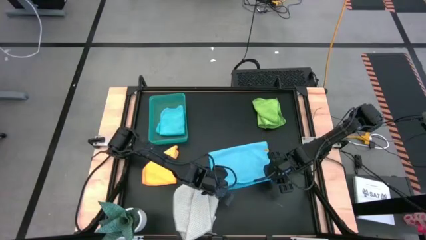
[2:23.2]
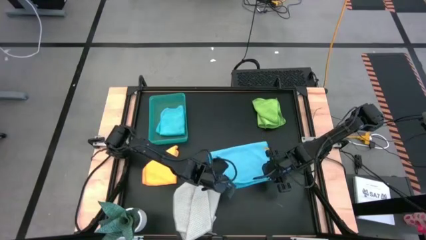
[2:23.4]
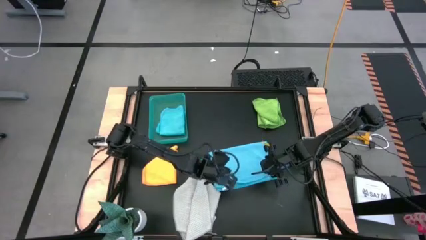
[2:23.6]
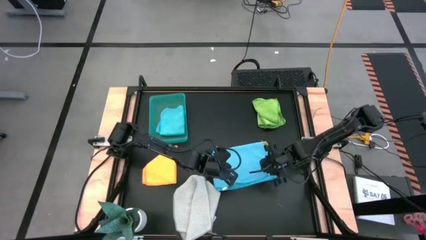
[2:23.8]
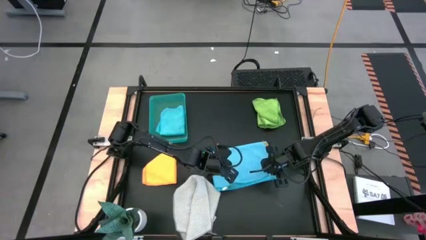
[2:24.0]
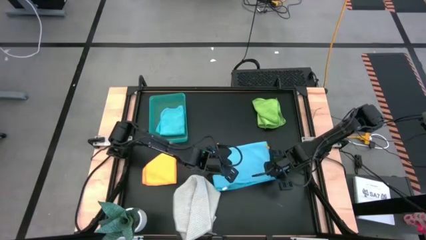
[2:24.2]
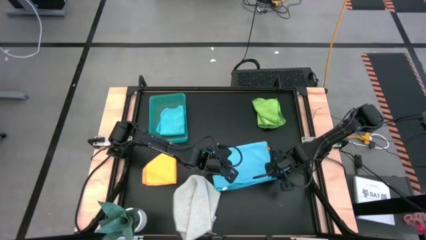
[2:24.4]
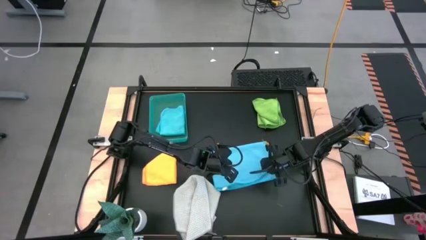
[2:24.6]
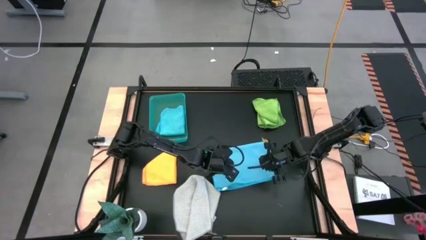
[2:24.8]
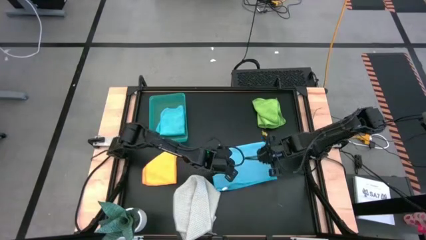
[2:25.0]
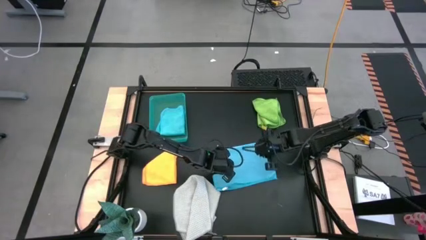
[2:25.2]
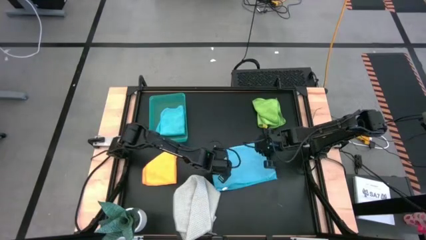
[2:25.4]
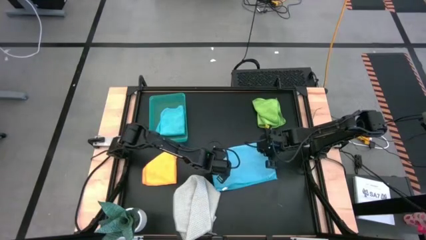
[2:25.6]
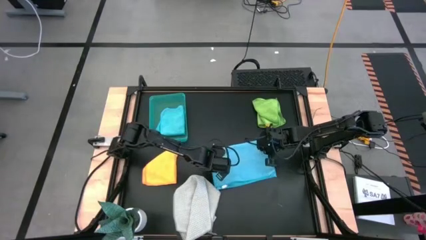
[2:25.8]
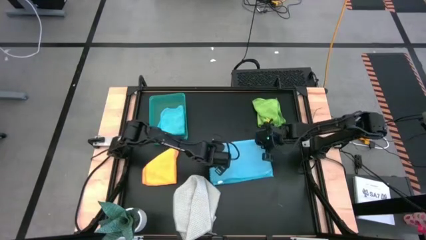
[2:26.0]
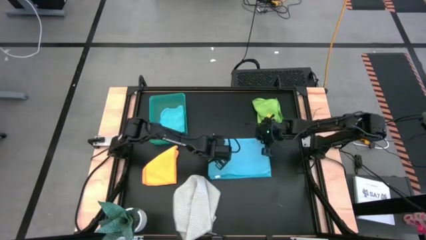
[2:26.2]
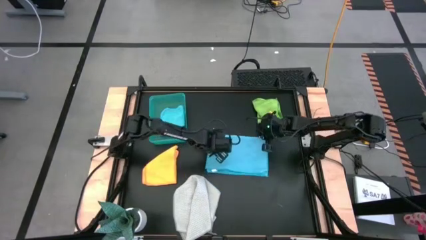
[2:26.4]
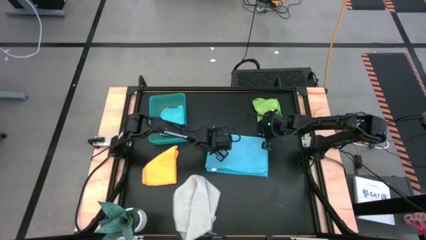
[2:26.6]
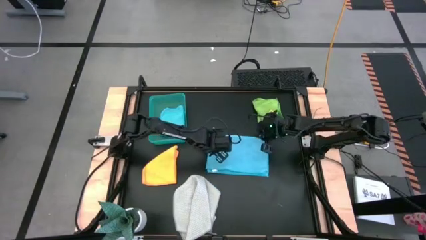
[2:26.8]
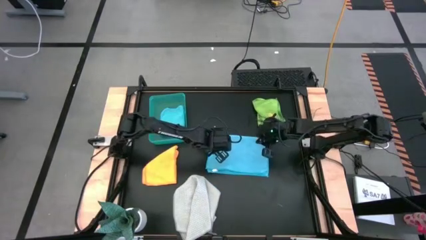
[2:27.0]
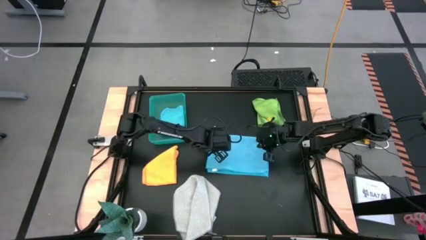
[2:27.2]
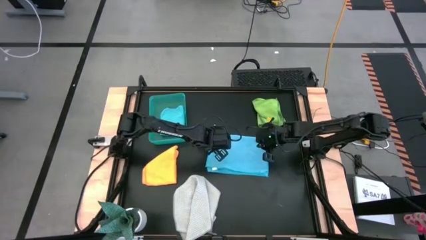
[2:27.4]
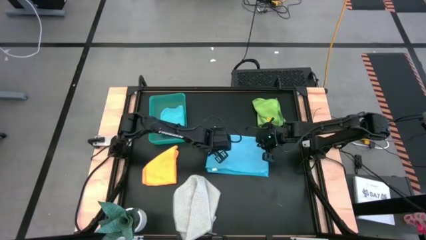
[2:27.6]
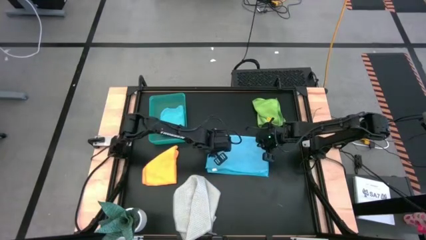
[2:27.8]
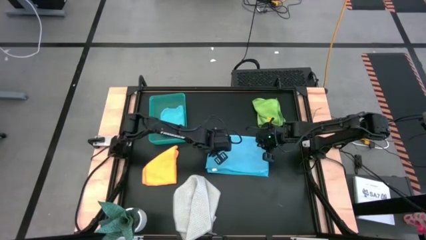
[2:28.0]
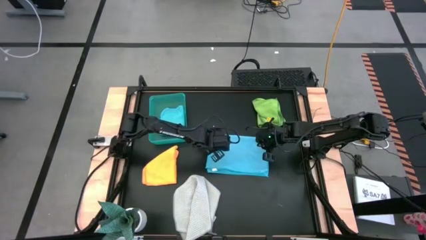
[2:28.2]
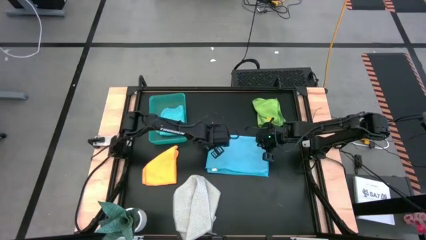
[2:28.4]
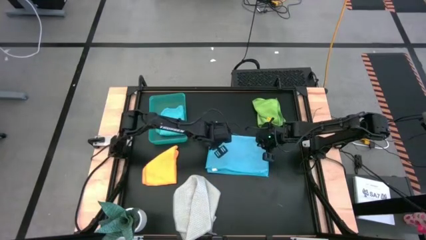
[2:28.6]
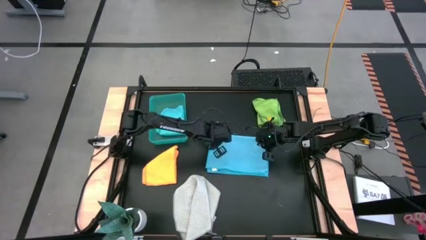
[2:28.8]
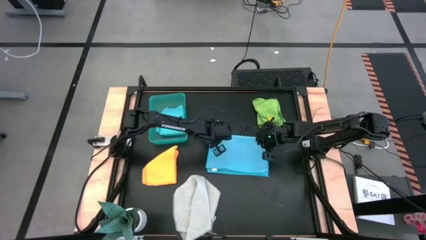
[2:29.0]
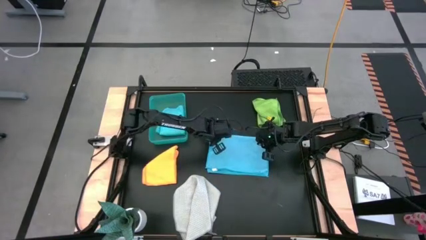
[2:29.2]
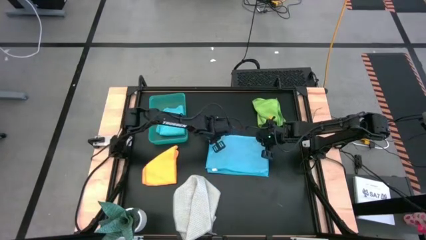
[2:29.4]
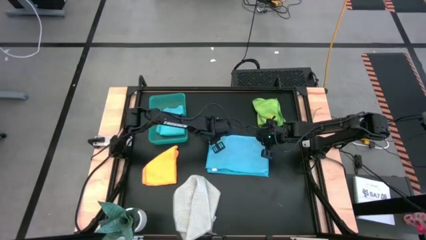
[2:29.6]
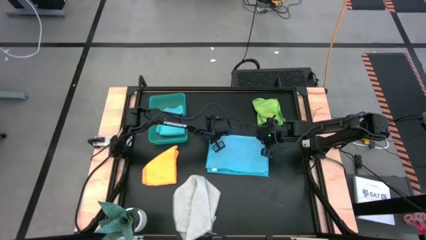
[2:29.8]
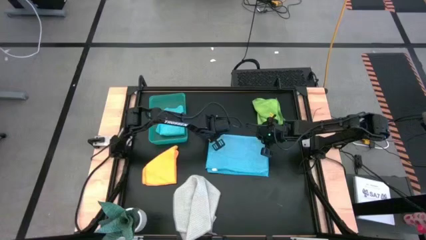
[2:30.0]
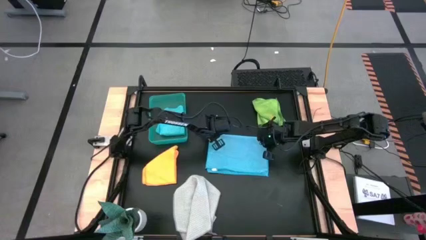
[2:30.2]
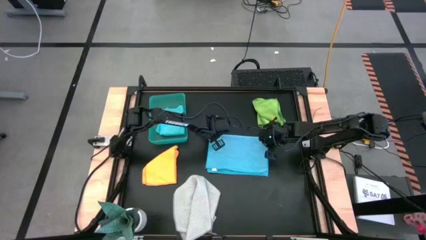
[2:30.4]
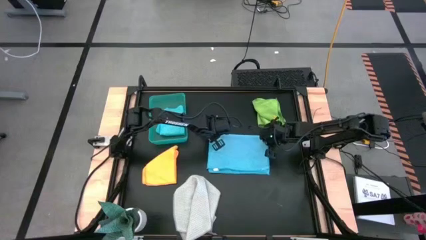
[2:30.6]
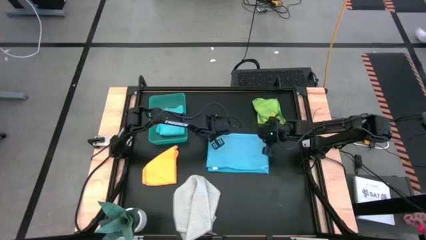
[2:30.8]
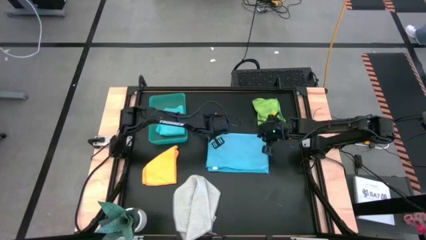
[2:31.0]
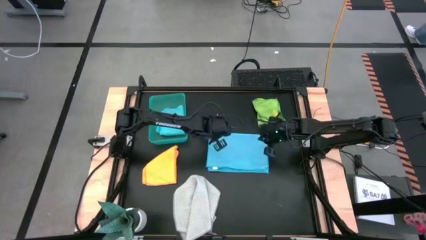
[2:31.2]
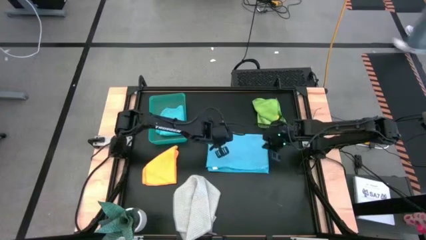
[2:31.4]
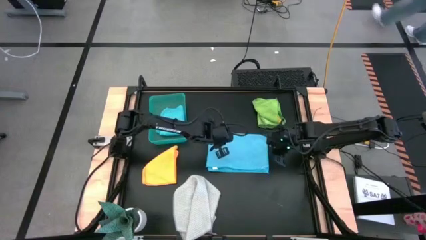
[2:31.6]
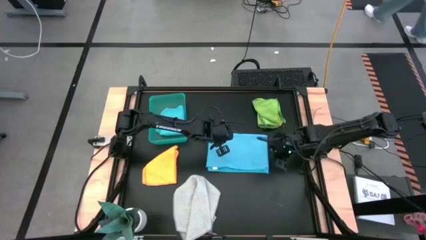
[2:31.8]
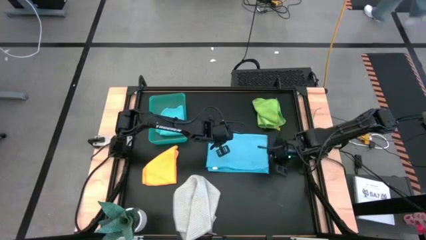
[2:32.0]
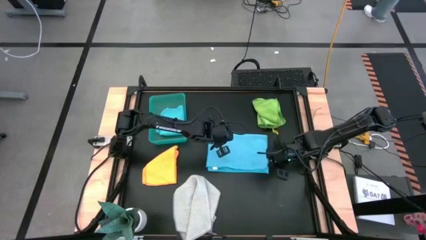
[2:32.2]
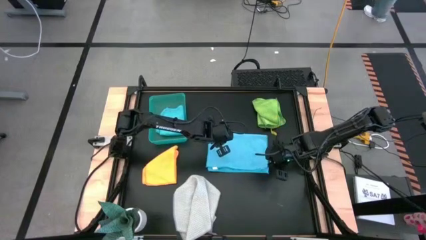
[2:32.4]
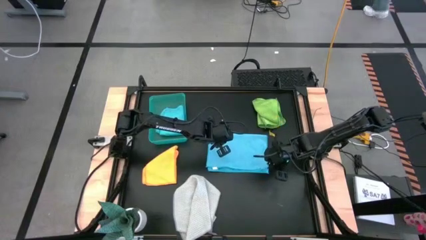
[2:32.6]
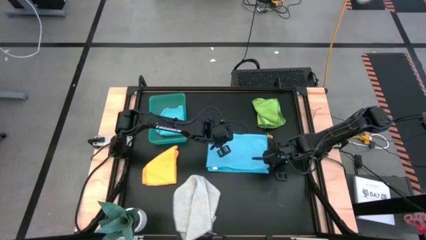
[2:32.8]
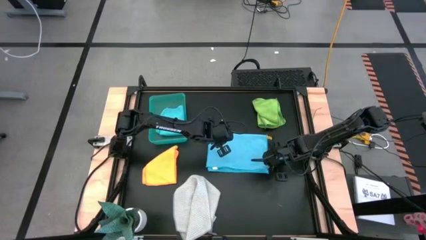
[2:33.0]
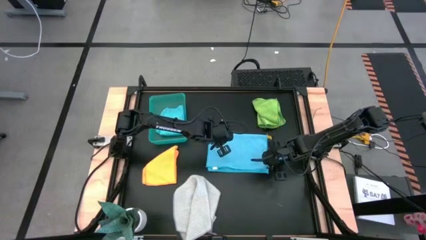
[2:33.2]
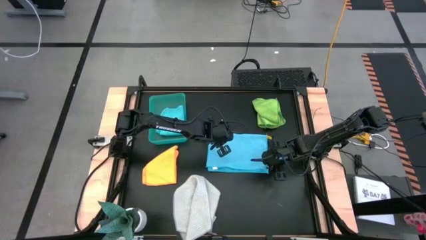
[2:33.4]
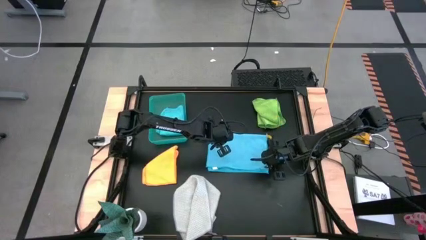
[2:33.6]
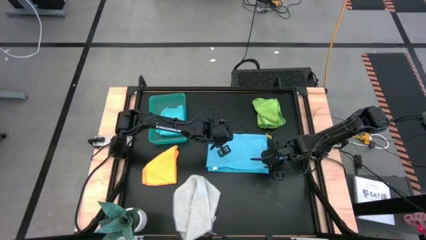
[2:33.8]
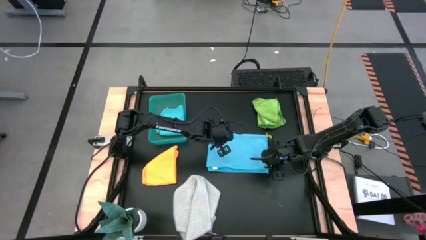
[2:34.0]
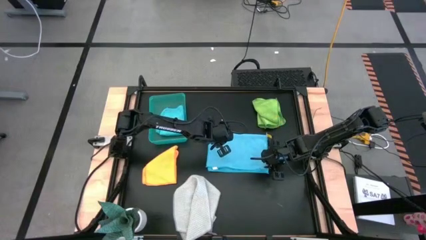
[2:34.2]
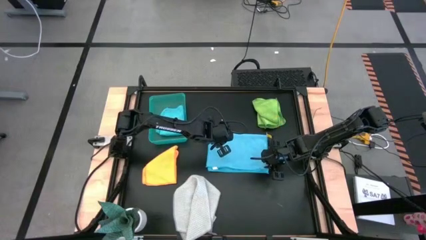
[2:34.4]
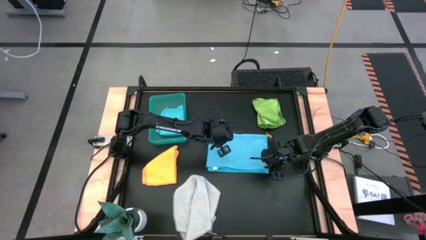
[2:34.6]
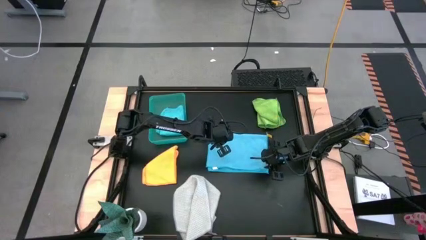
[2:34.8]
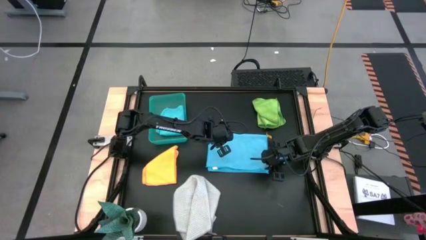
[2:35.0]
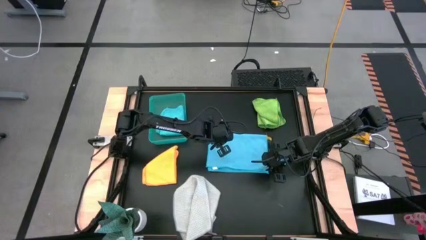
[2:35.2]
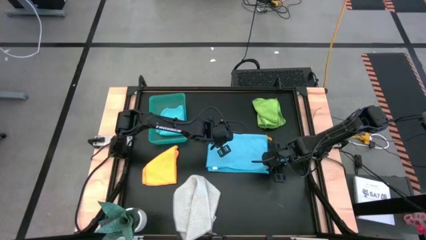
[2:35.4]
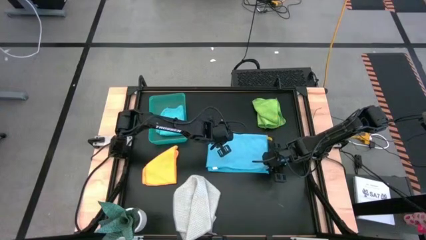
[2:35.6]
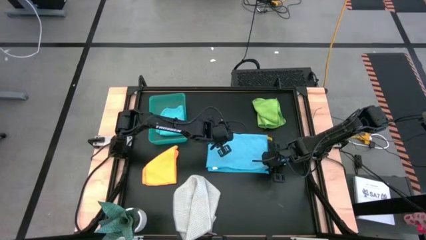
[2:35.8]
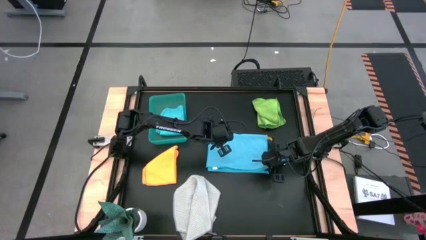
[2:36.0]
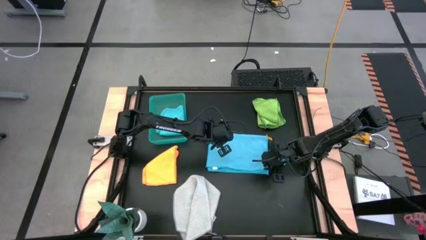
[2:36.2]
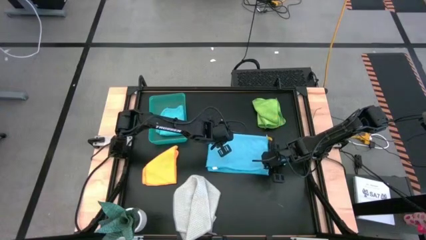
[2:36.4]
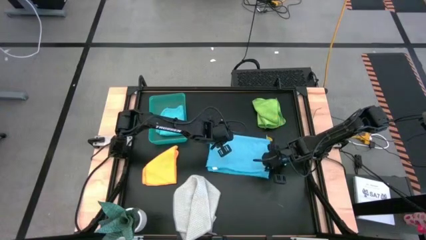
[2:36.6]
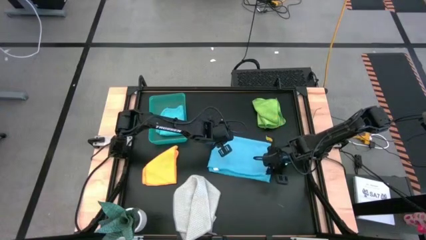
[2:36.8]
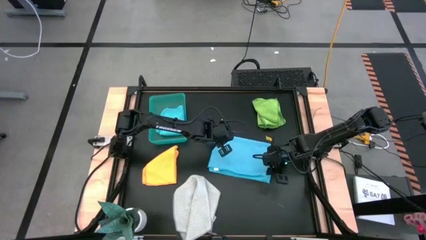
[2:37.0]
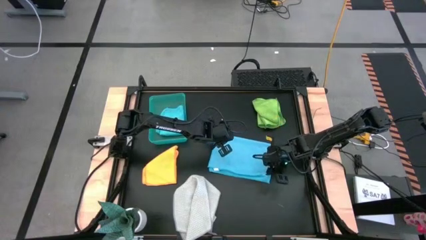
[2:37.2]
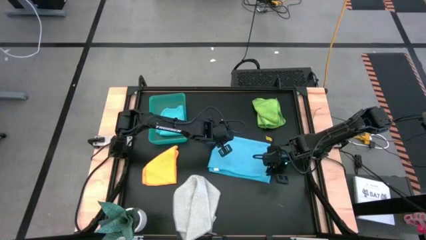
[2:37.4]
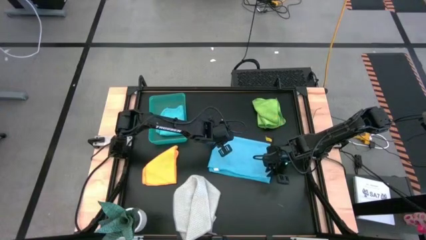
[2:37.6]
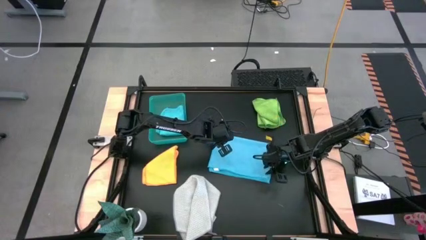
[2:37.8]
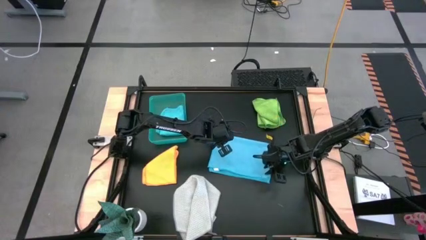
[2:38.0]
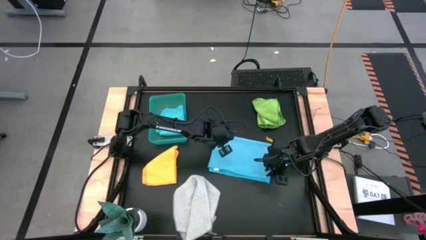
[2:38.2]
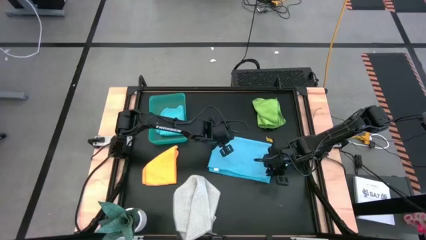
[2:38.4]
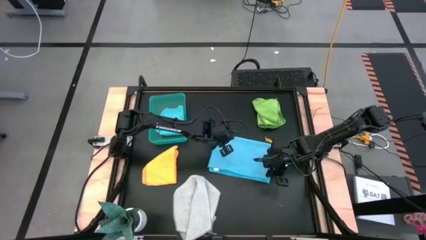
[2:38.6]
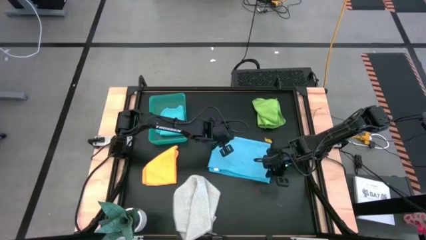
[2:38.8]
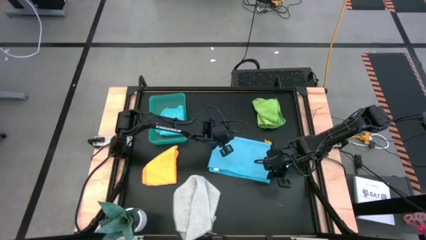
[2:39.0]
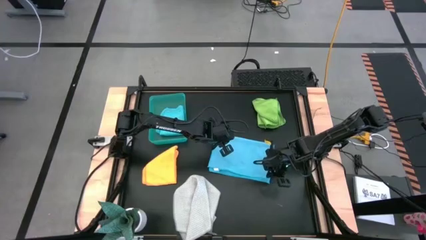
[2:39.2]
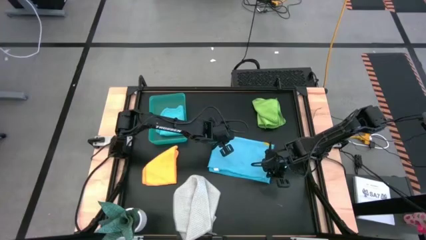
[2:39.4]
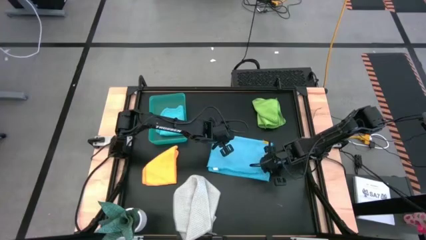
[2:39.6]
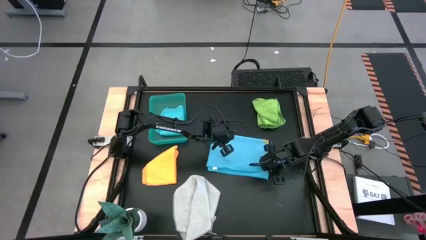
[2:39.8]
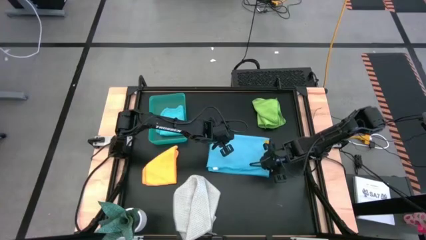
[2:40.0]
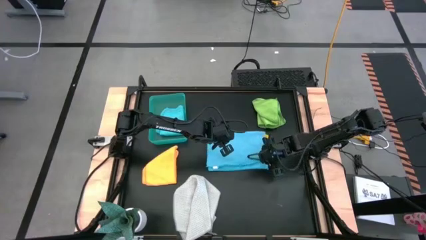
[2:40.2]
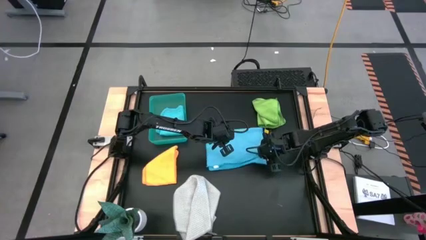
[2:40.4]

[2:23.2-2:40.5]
Task: Fold microfiber towels
Fold the blue microfiber towel
